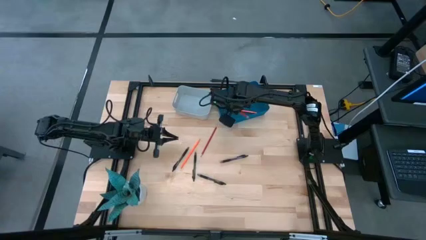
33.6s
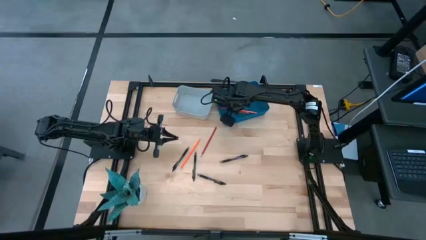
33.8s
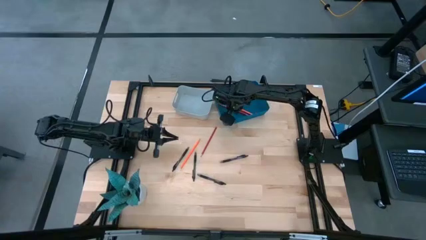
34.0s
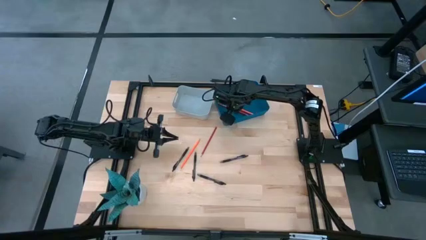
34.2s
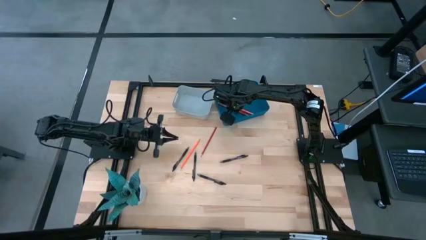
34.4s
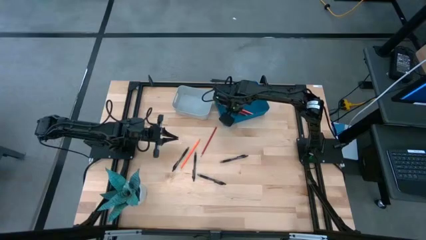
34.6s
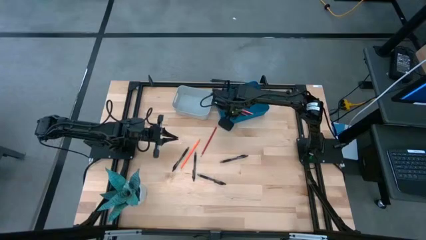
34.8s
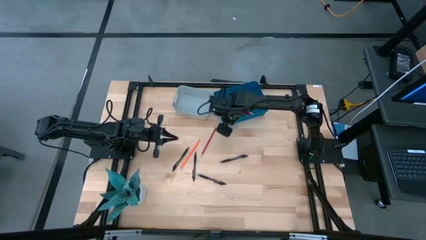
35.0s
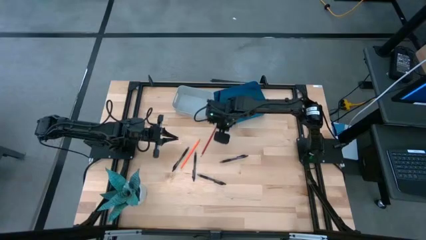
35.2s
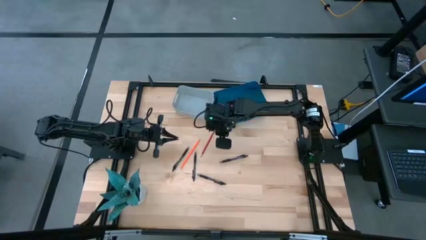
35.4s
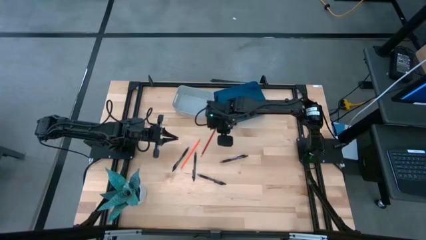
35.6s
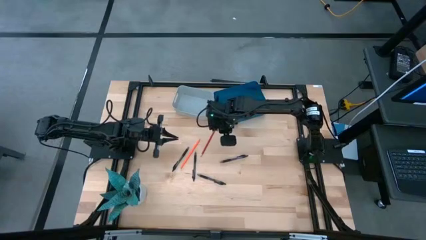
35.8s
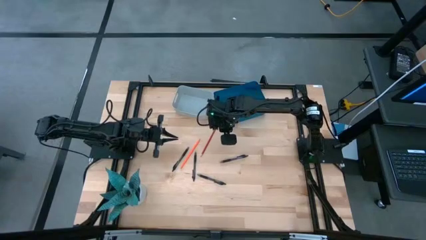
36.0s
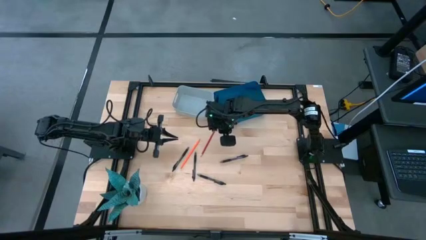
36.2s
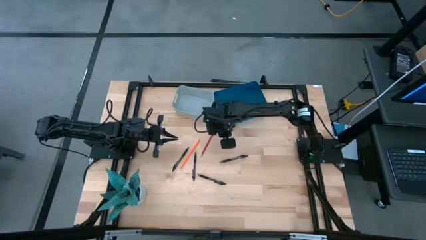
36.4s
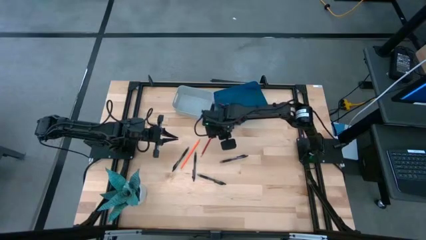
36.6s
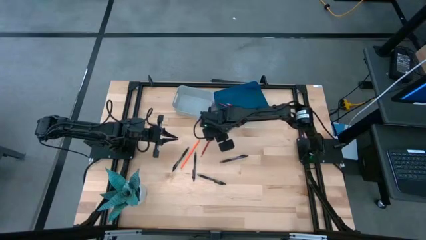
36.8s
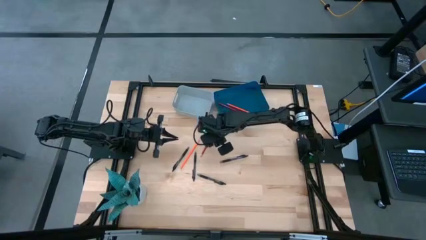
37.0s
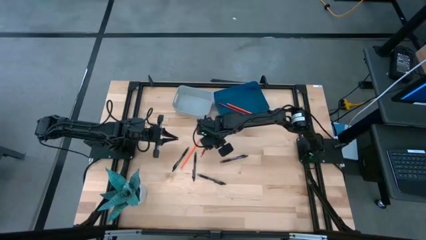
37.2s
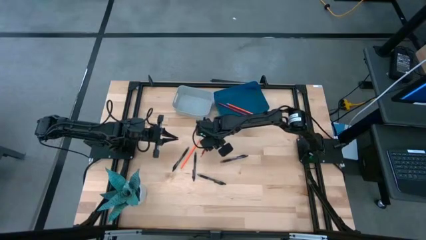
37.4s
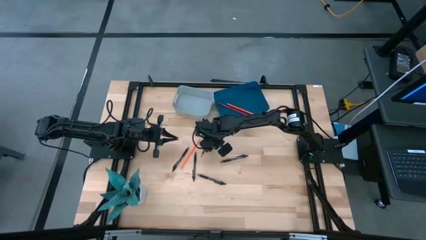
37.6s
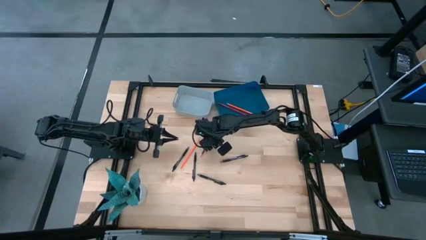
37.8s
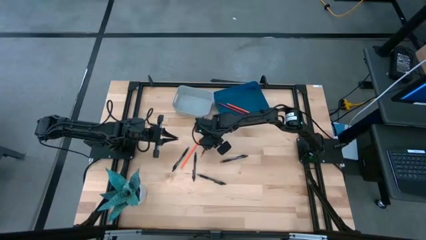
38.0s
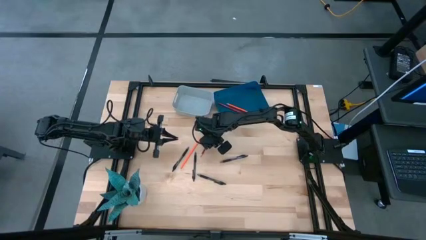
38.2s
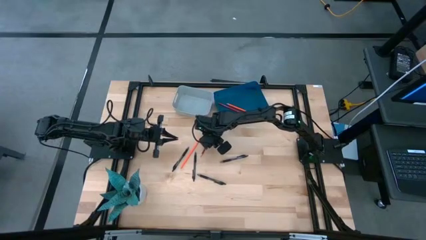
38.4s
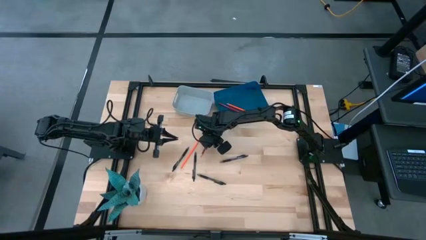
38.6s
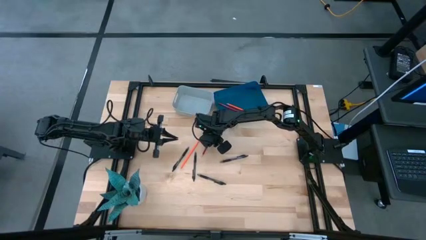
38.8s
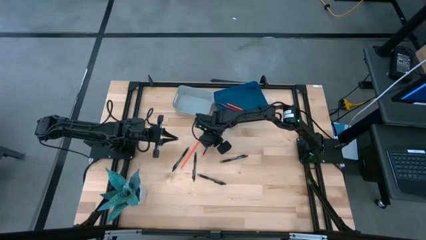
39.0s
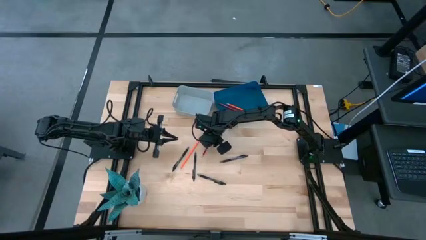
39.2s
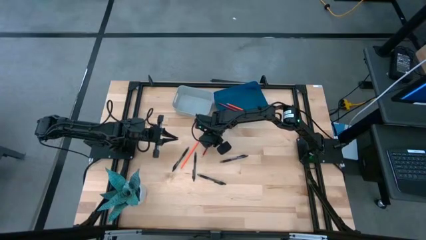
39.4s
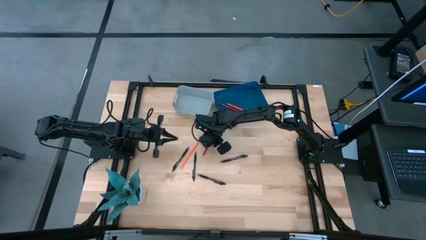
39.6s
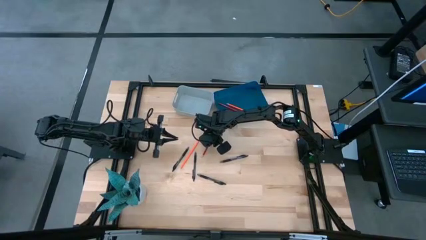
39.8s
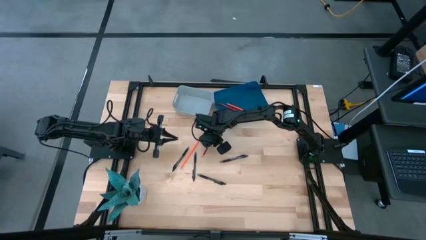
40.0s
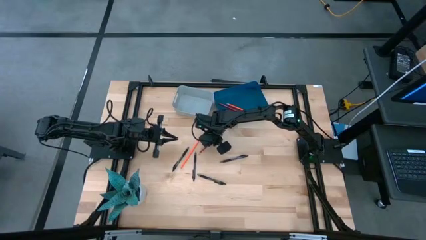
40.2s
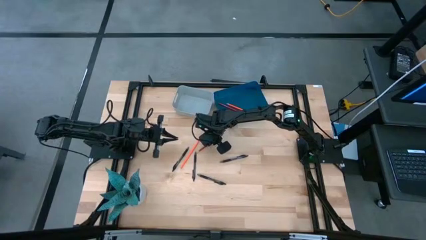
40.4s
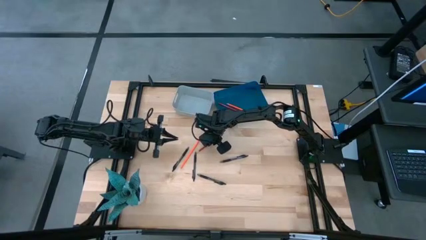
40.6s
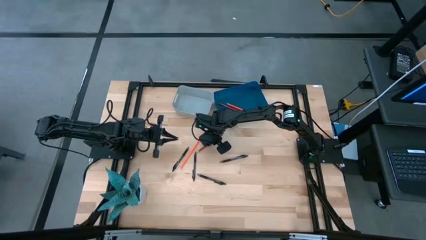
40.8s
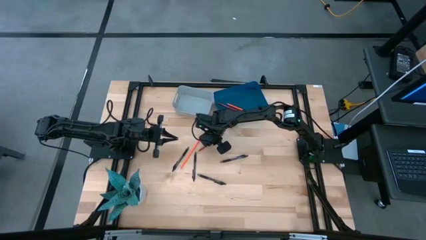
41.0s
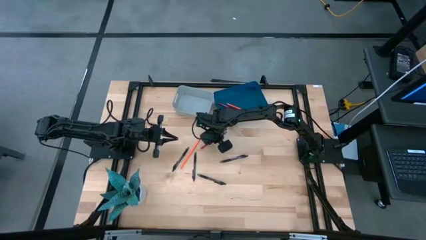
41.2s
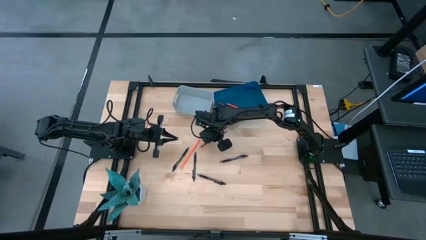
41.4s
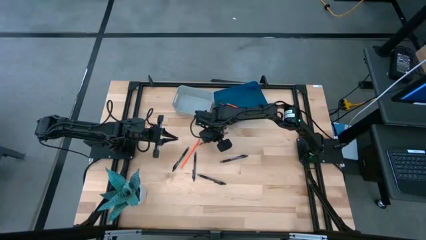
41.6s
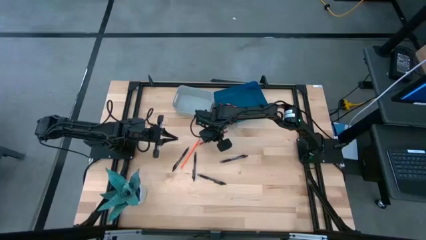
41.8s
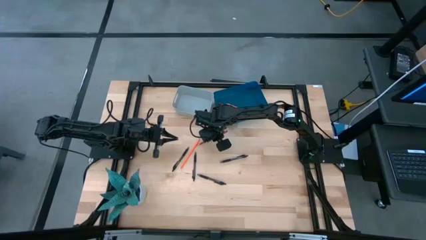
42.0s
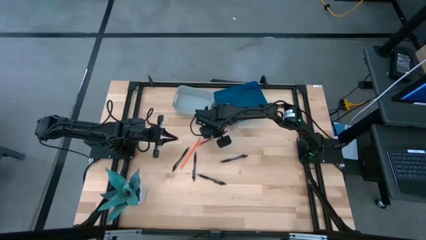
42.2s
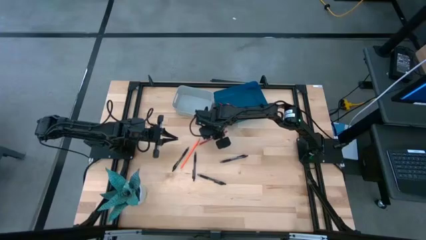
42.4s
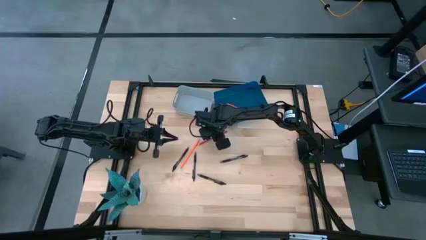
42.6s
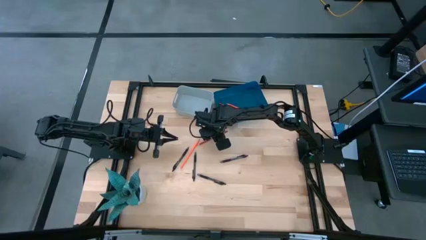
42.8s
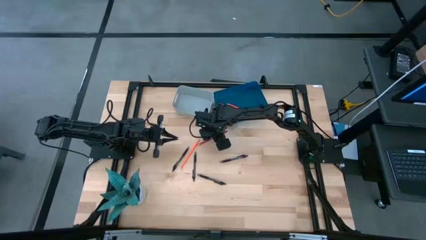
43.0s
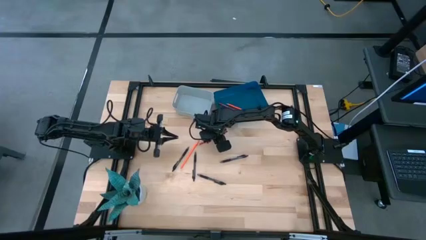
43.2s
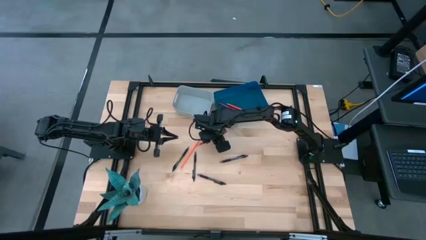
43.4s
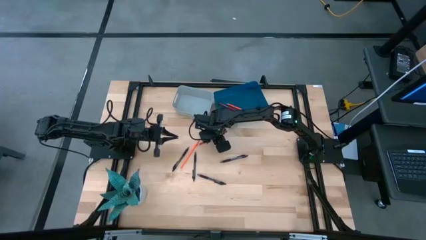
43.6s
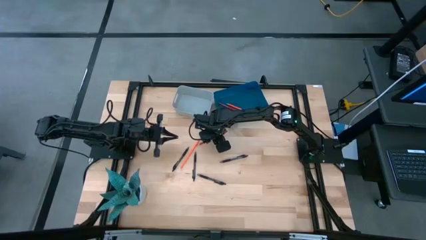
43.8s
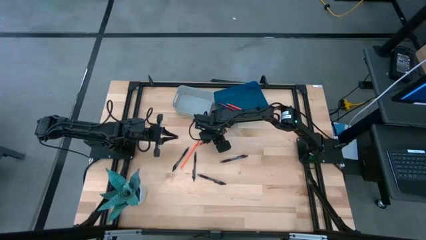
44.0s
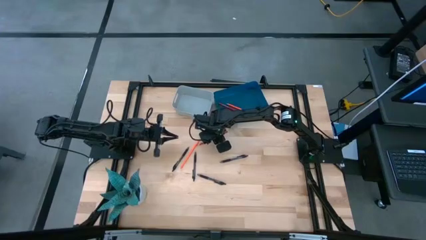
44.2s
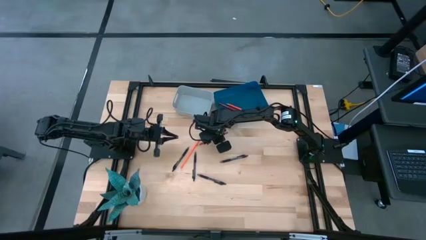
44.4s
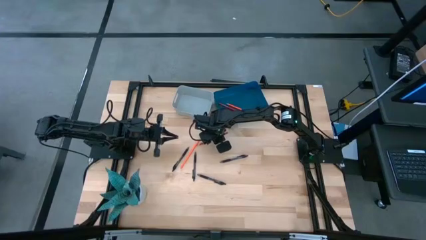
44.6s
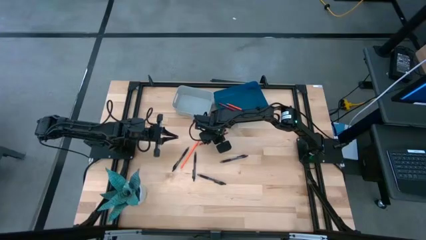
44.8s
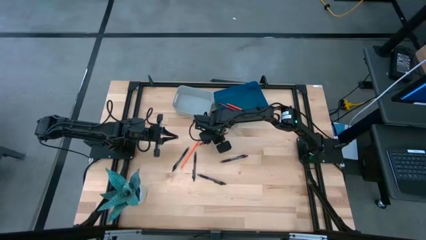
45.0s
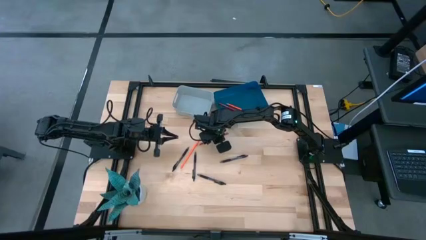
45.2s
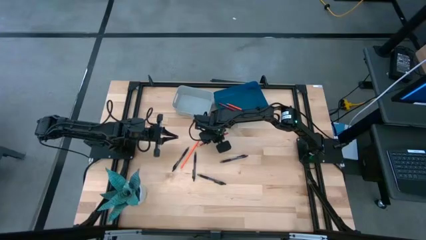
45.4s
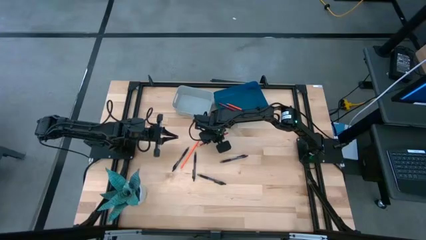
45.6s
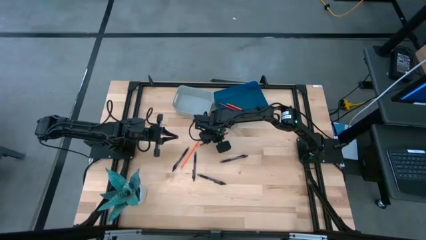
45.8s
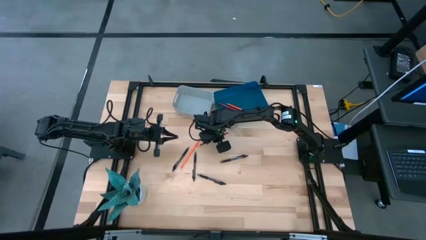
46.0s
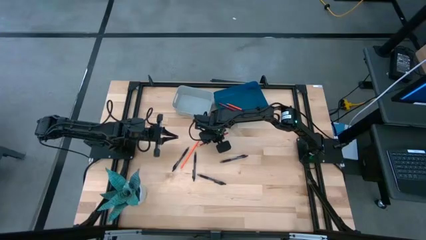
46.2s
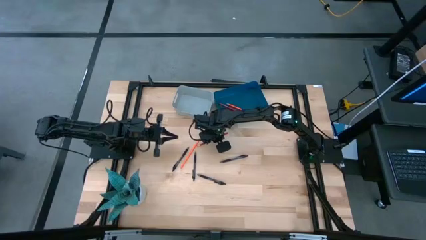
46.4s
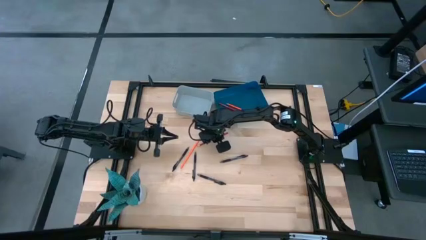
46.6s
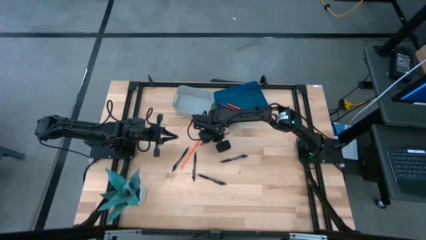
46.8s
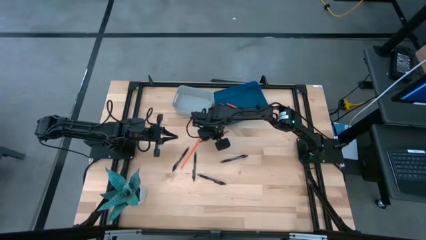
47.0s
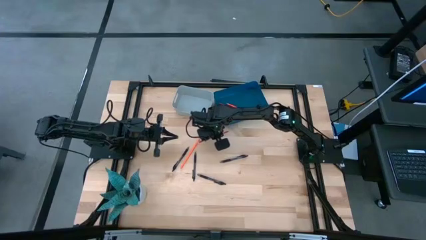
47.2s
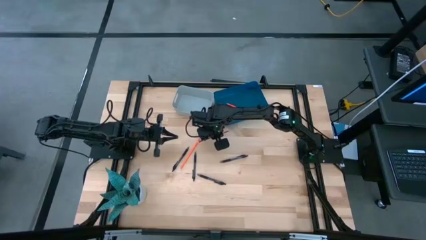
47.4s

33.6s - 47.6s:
Task: Sort pens & pencils
Put the red pencil into the blue bin

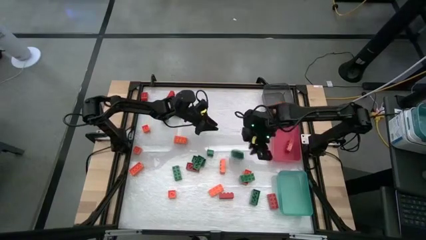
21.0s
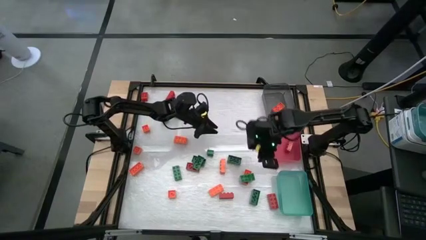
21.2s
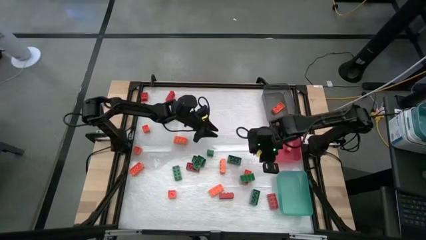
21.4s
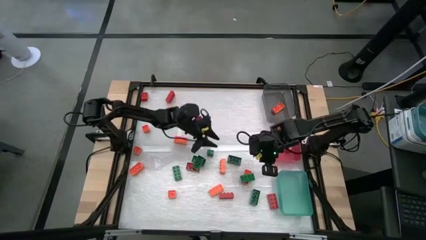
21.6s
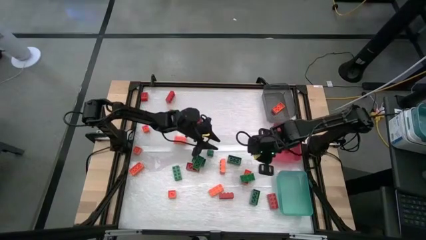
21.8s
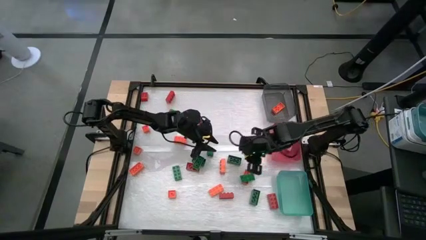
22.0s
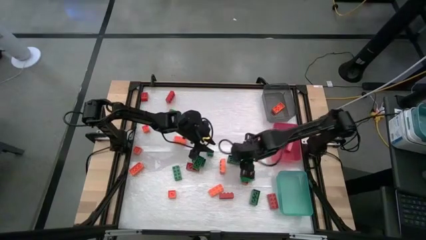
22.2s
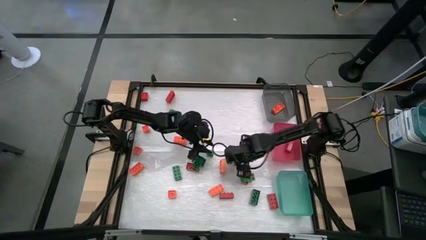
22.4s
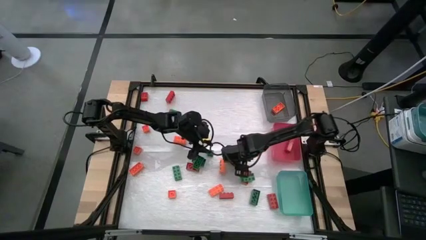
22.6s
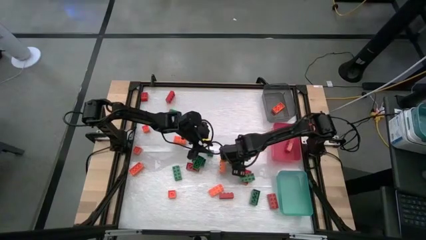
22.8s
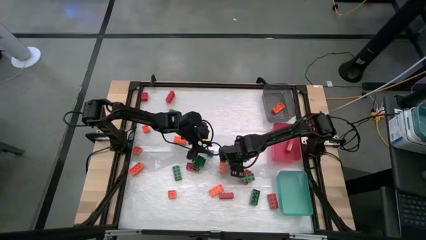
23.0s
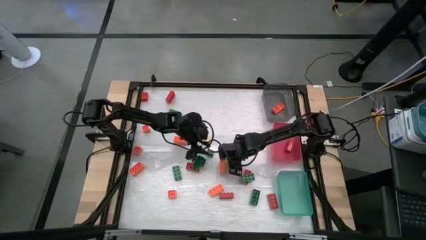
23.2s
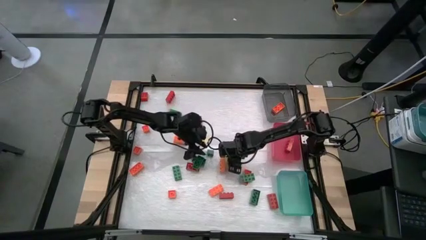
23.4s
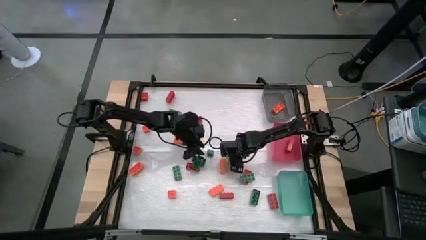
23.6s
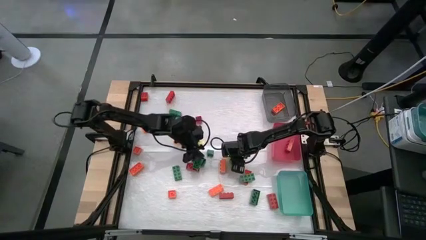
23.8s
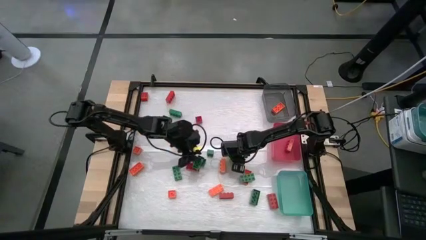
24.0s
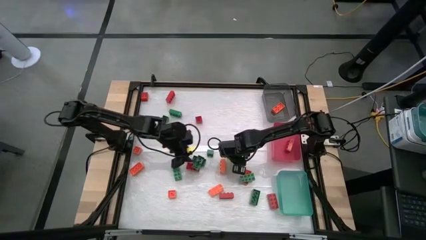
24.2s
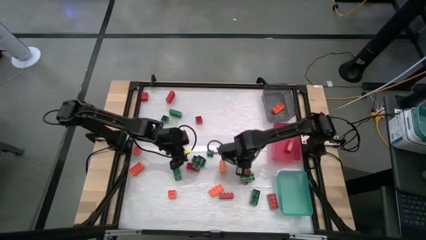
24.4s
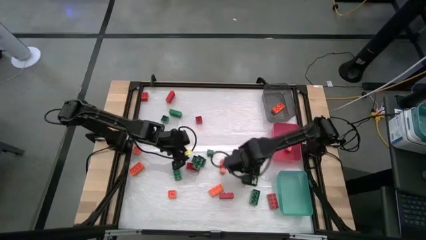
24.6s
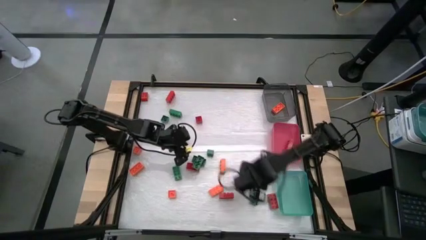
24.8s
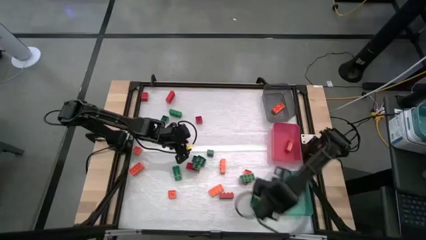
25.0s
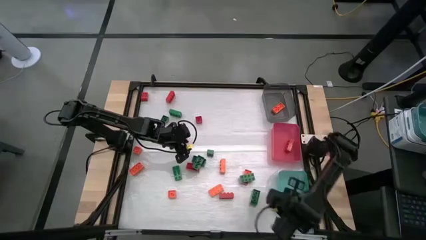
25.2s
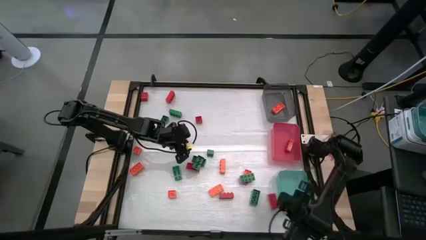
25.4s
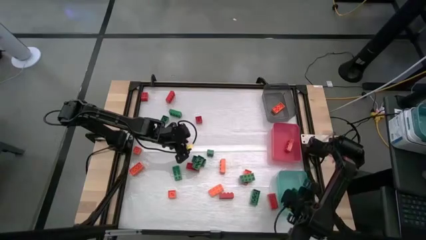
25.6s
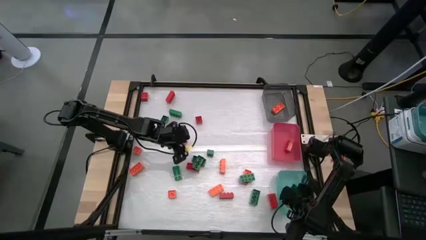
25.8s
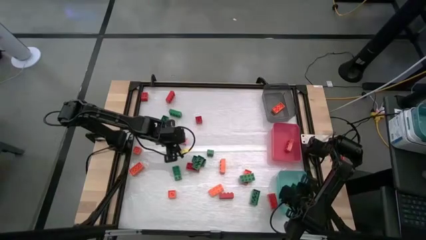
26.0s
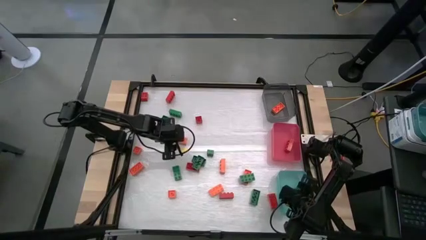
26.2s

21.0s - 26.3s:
Task: Sort blocks
Put the green game piece into the blue bin
